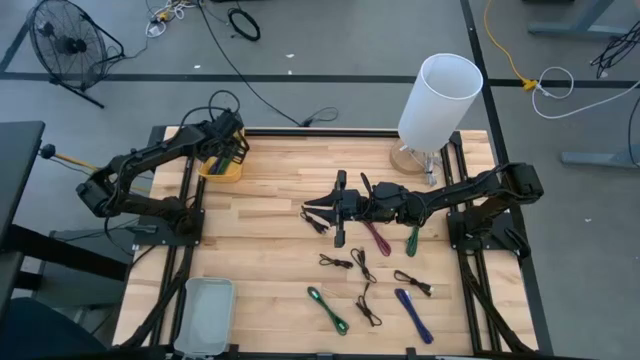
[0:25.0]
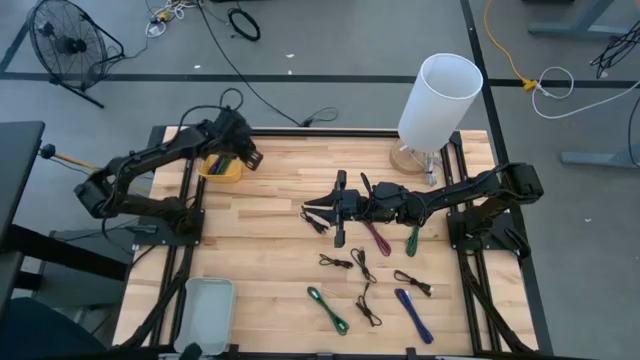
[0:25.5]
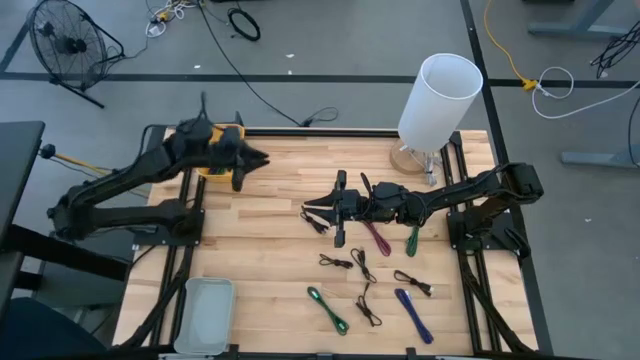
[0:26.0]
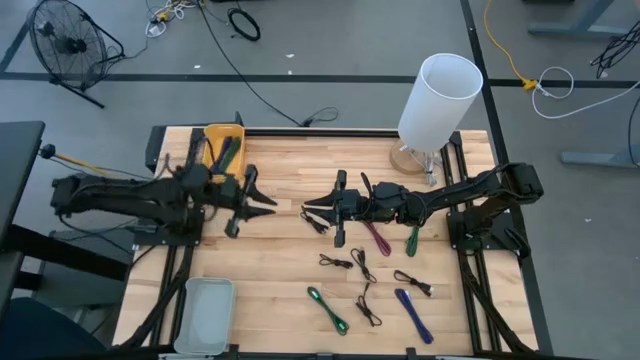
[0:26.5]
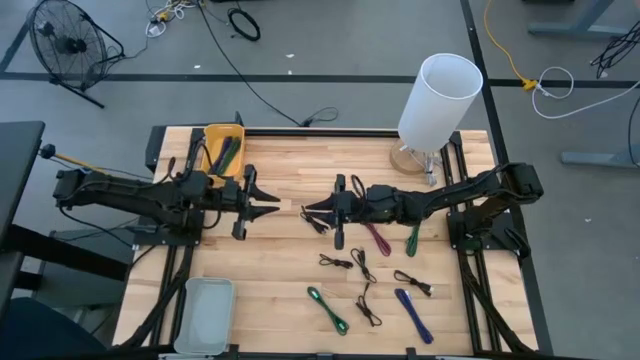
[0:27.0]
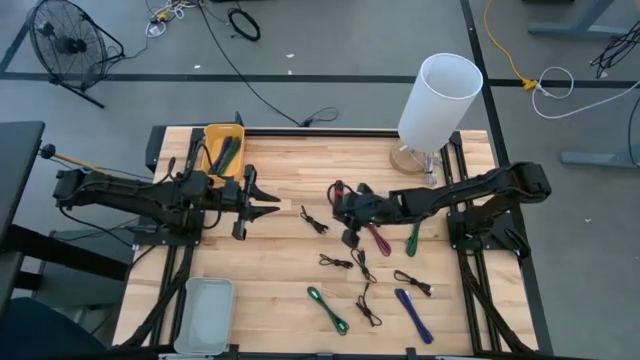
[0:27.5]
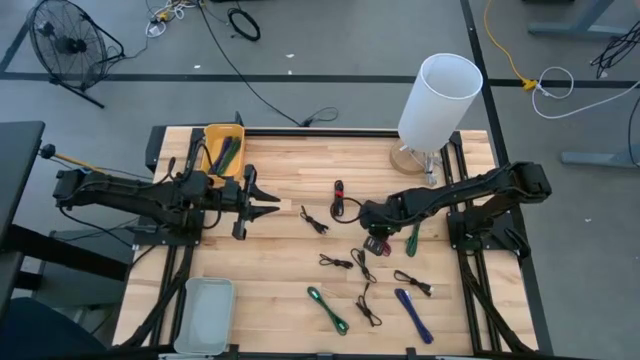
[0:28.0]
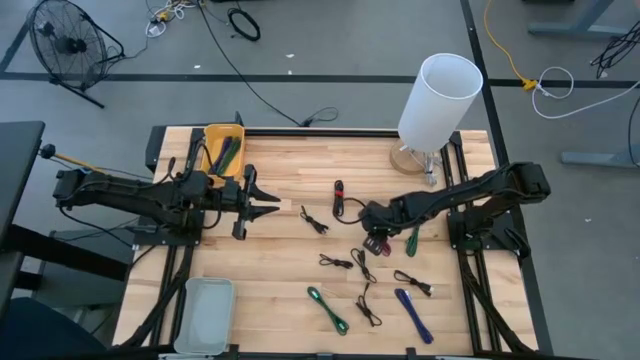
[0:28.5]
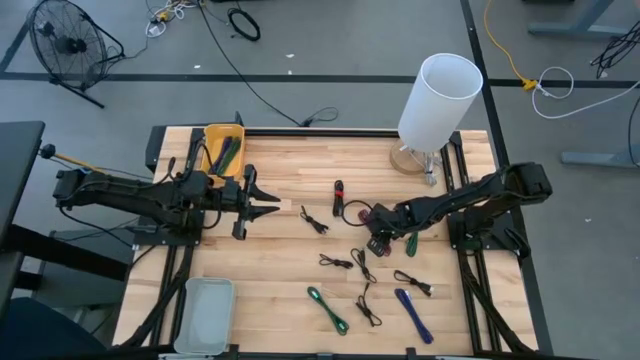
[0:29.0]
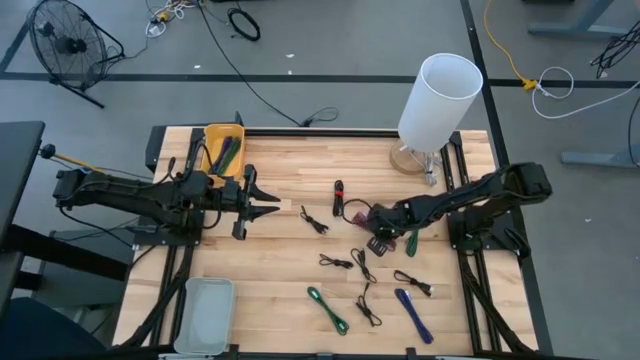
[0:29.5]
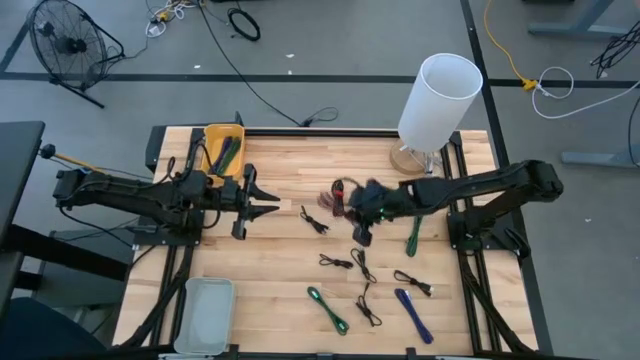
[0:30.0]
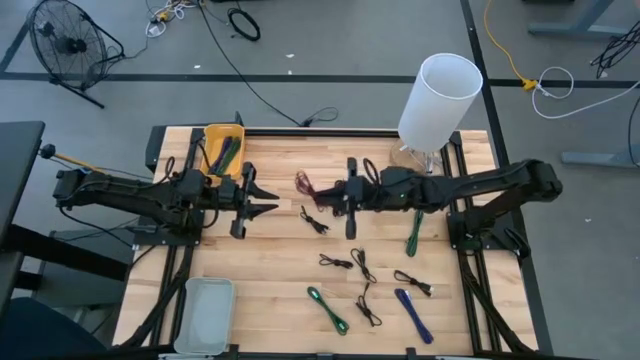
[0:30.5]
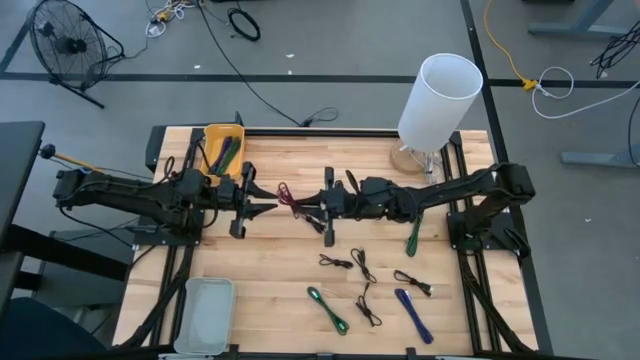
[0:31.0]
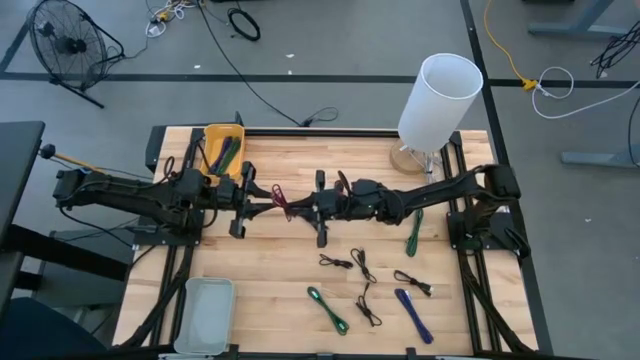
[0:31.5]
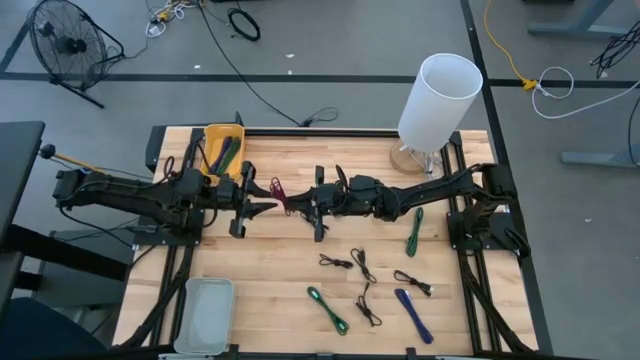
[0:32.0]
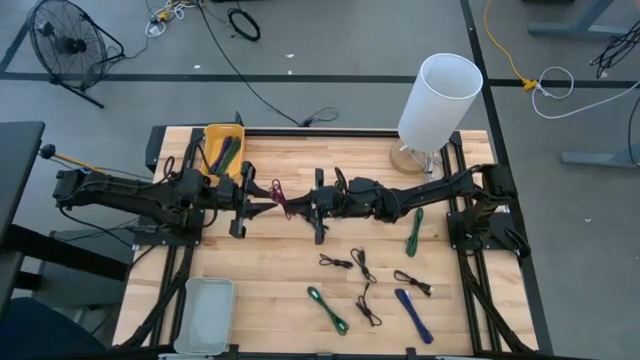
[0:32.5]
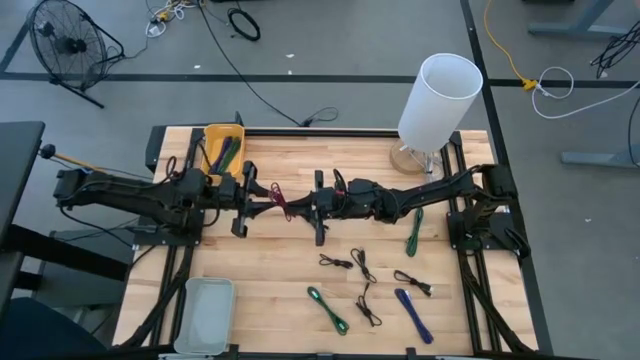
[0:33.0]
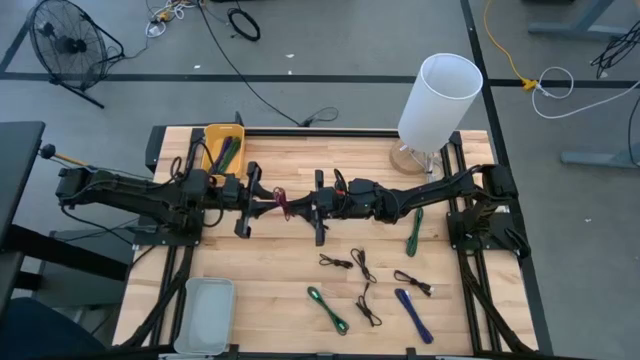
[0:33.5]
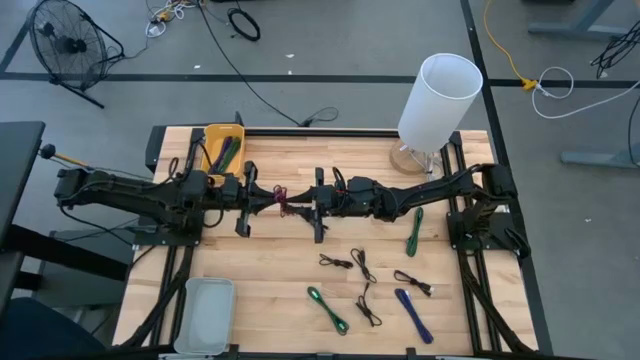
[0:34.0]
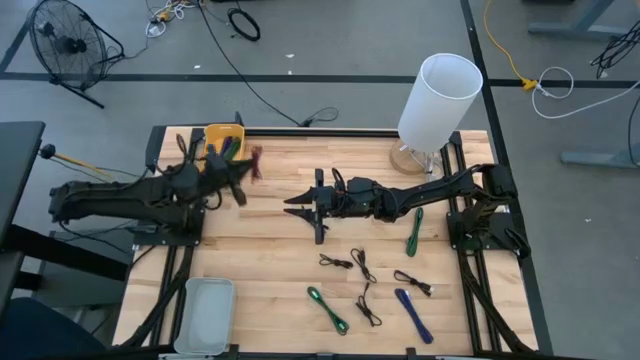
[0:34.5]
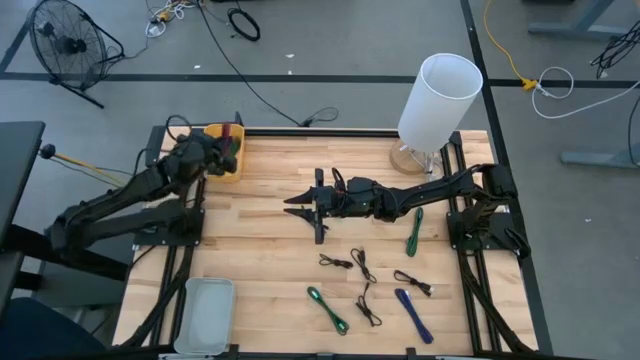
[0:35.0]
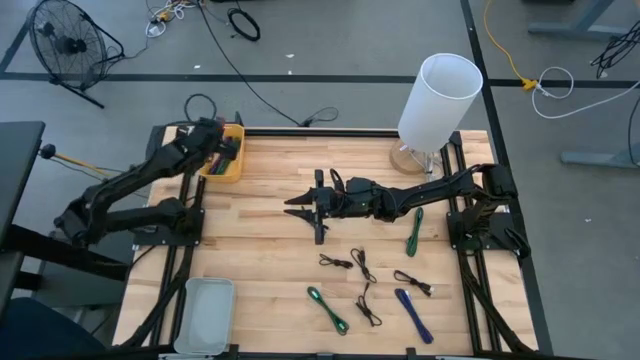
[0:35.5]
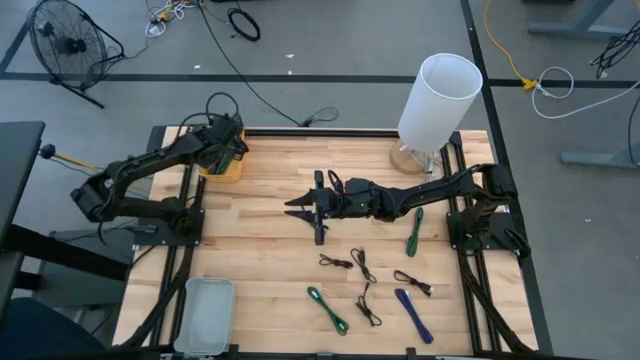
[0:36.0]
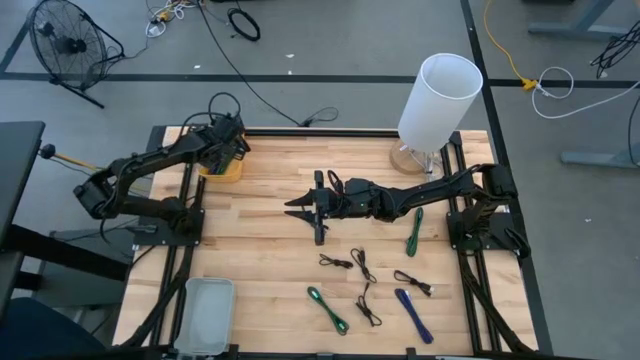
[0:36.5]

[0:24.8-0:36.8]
Task: Pick & Place USB Port
Put the pink charger cable into the yellow bin

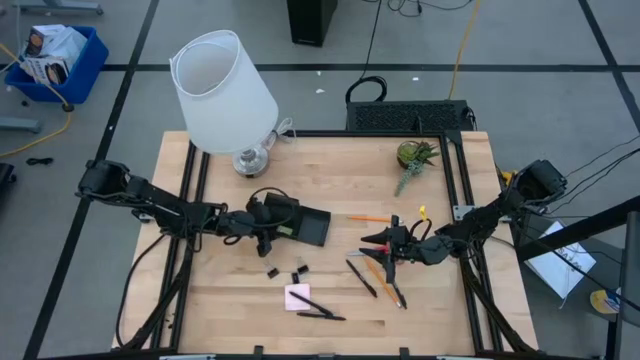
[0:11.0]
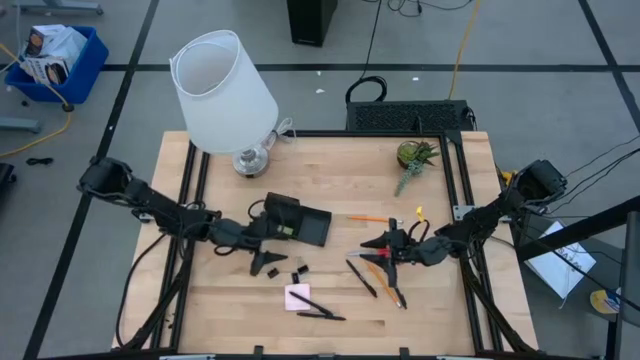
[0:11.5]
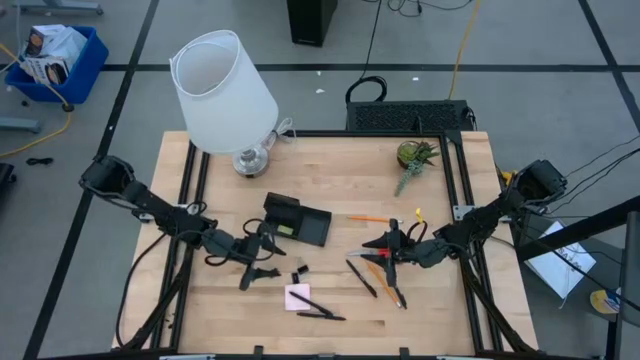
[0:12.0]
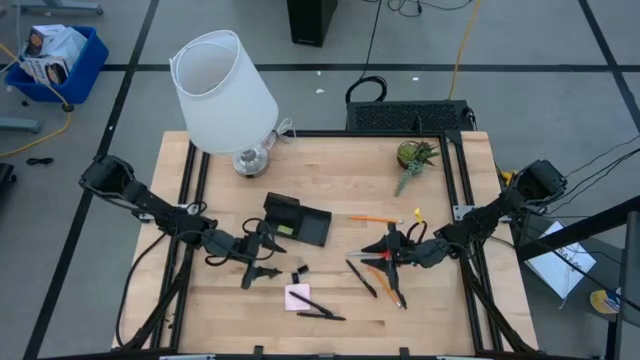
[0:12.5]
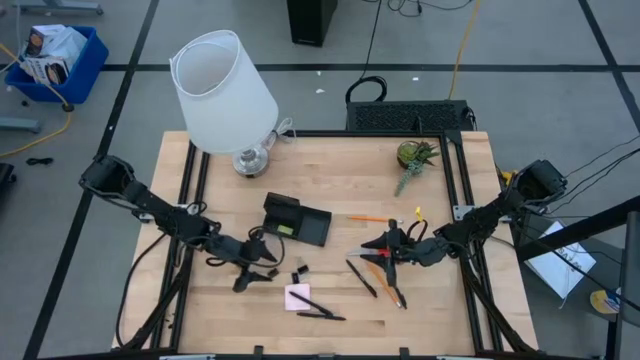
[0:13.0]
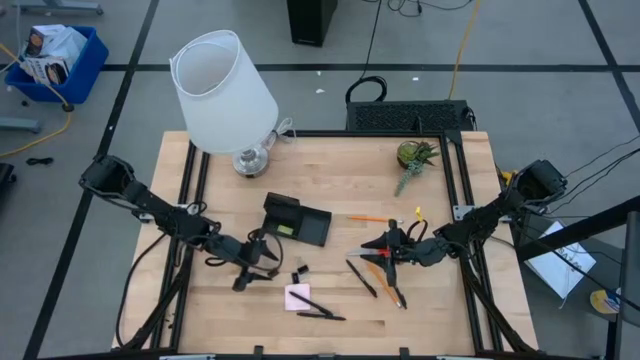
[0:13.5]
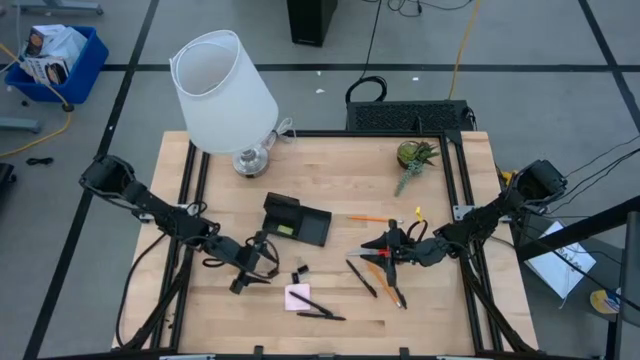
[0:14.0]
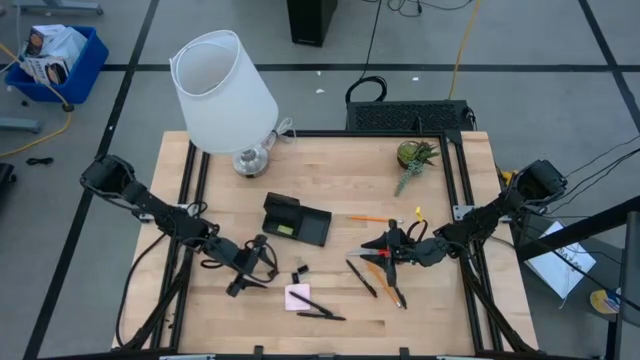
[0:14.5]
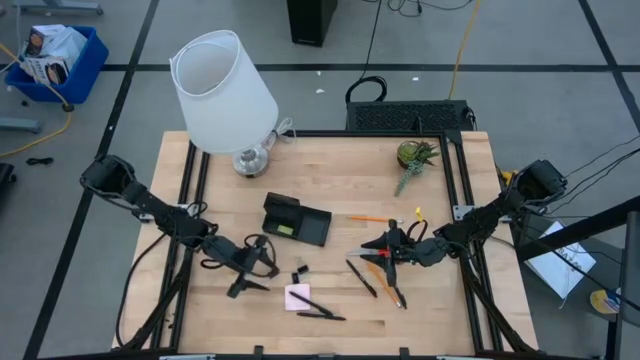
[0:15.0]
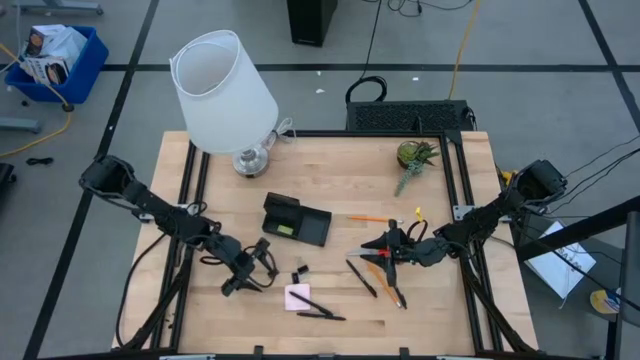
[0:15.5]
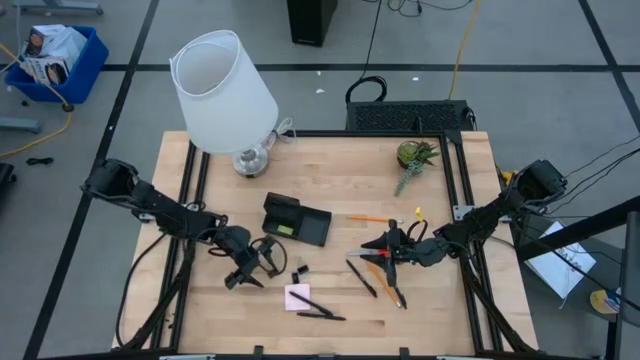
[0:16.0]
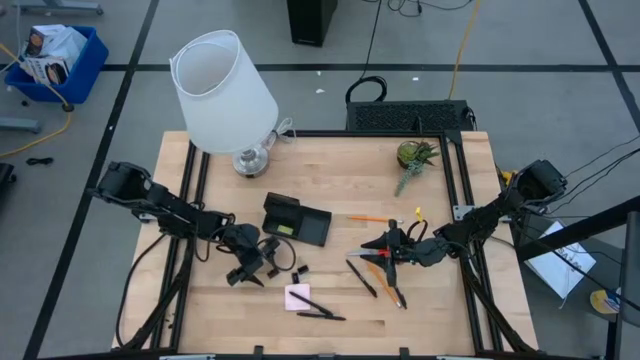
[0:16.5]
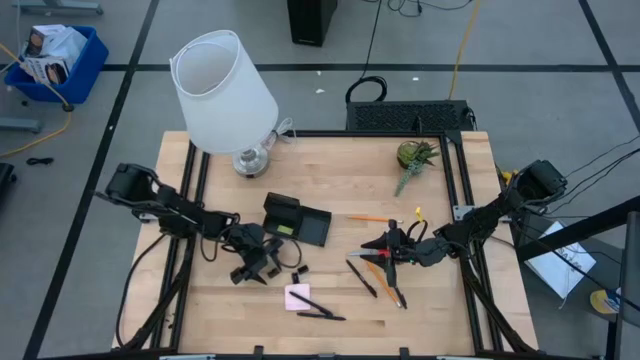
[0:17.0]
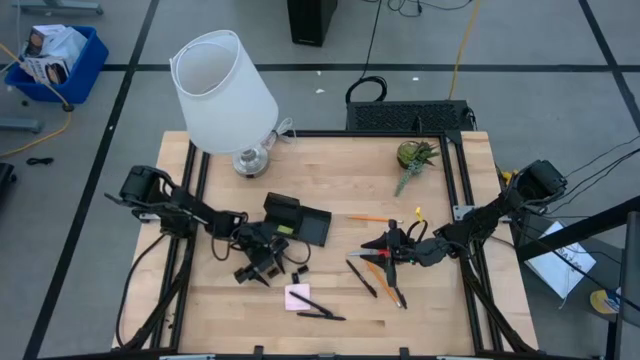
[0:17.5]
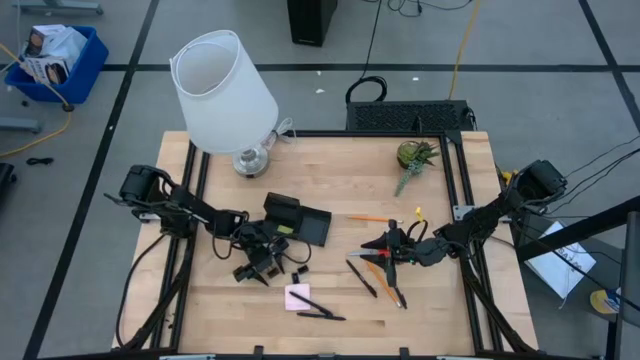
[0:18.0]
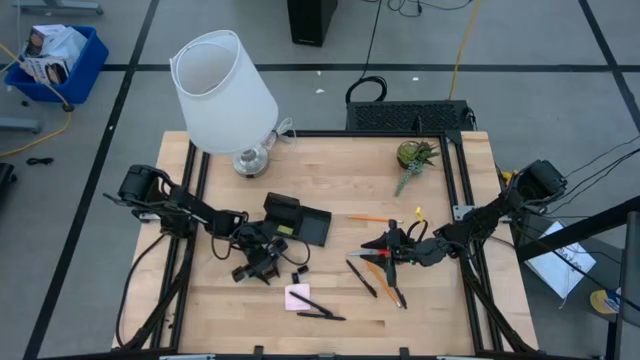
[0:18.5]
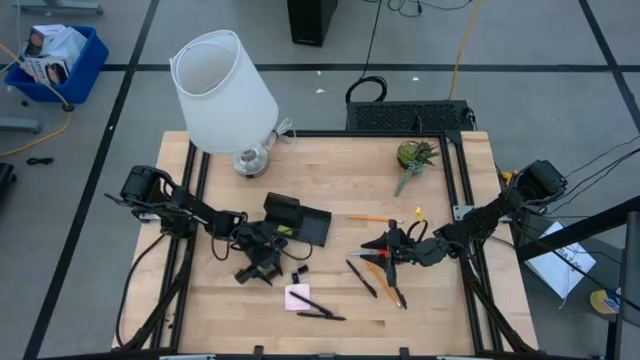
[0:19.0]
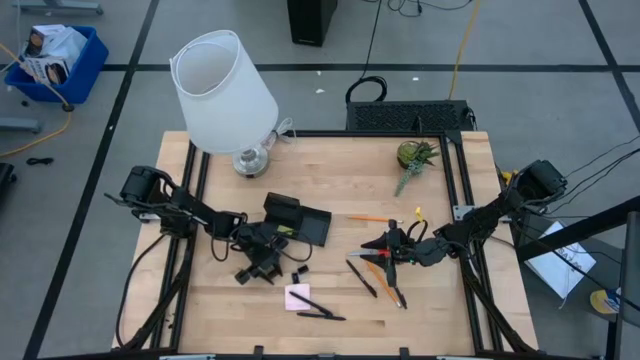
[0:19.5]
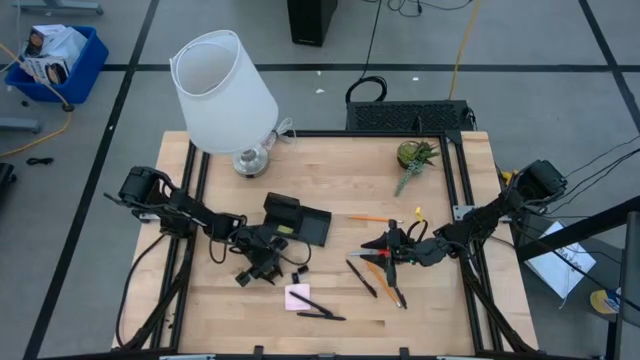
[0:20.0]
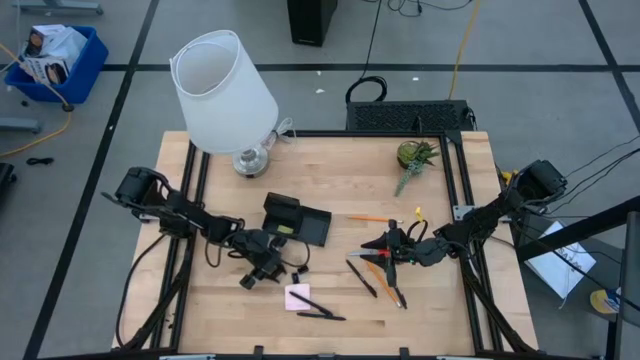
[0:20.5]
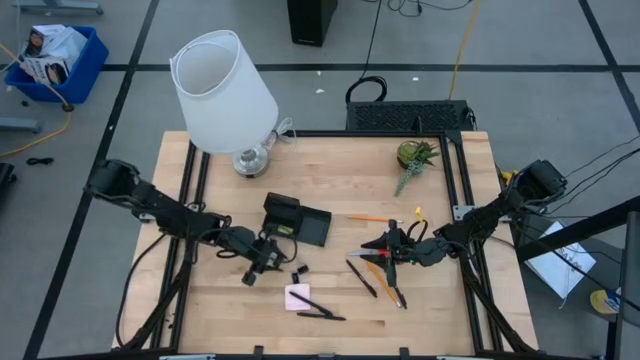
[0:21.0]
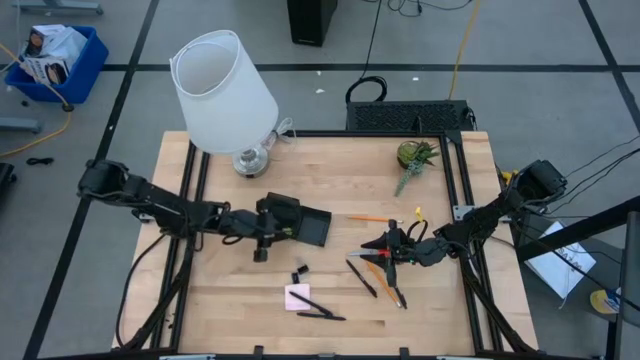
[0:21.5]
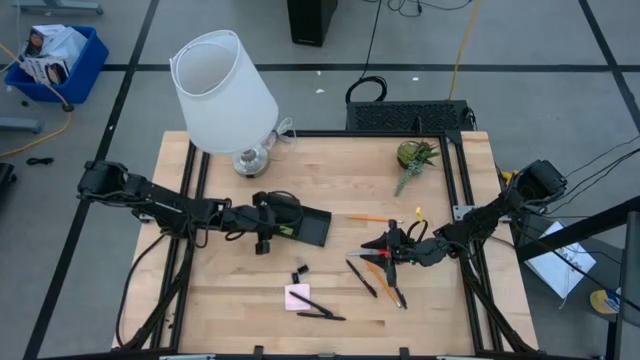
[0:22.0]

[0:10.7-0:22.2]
Task: Pick and place office supplies into organizer
Put the left black binder clip into the black desk organizer
